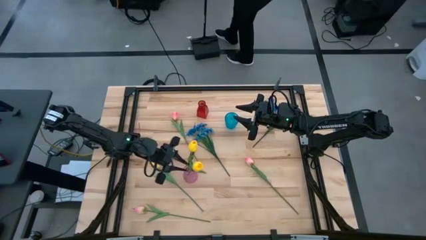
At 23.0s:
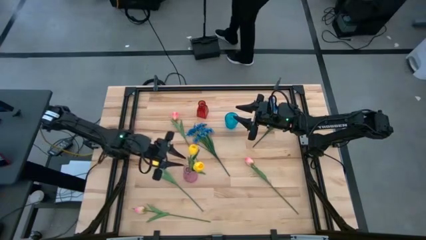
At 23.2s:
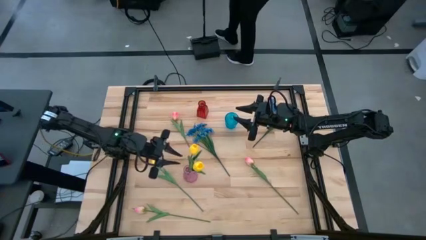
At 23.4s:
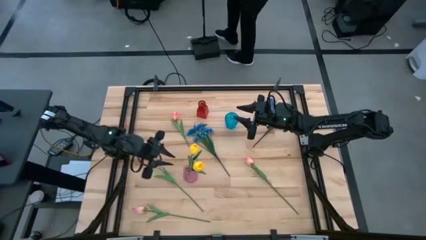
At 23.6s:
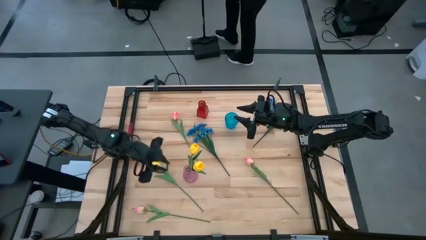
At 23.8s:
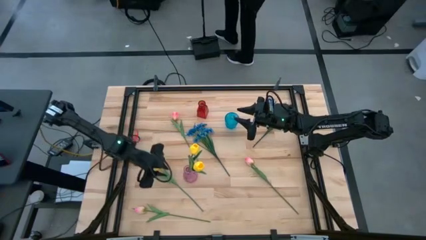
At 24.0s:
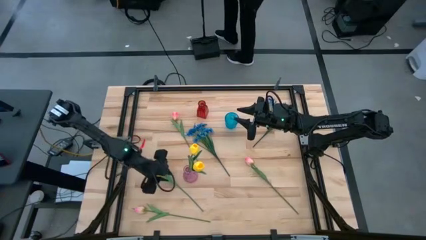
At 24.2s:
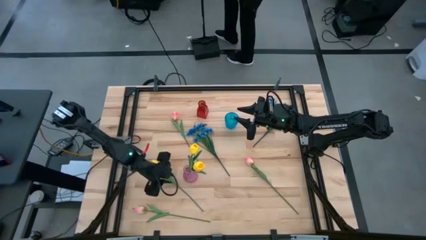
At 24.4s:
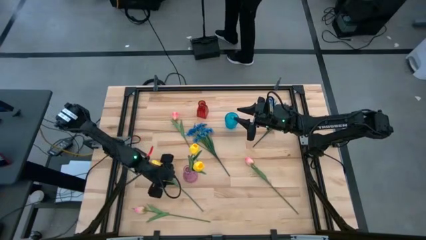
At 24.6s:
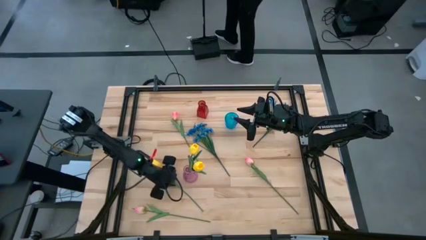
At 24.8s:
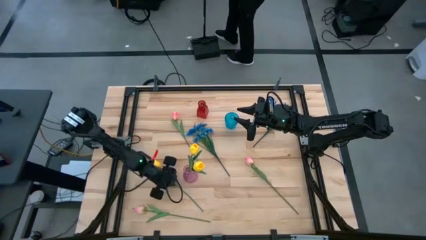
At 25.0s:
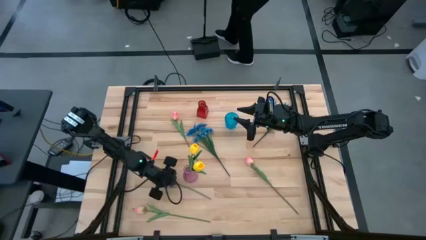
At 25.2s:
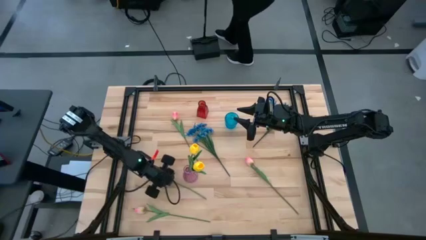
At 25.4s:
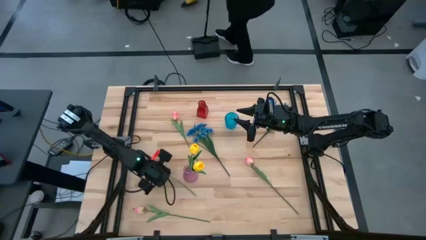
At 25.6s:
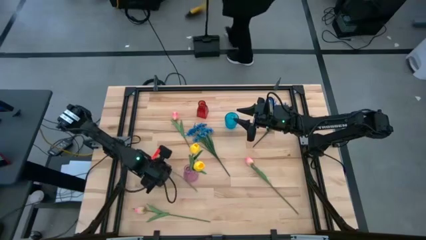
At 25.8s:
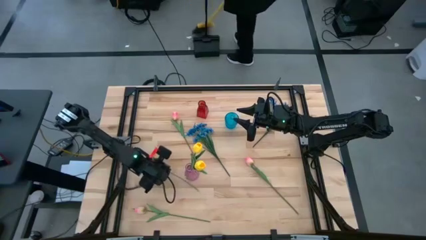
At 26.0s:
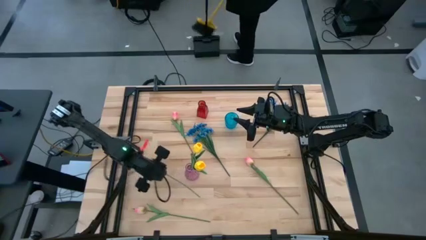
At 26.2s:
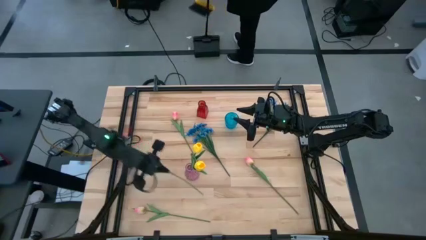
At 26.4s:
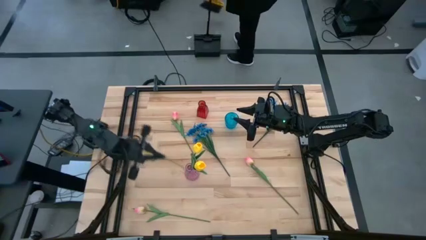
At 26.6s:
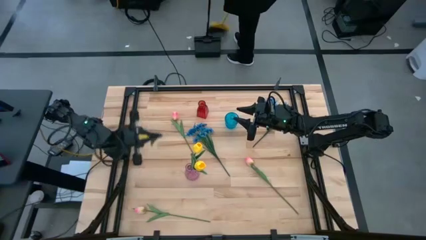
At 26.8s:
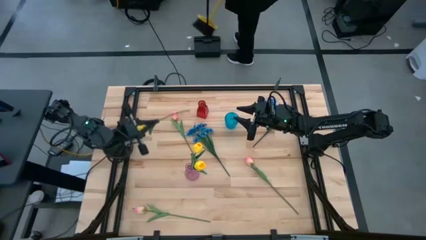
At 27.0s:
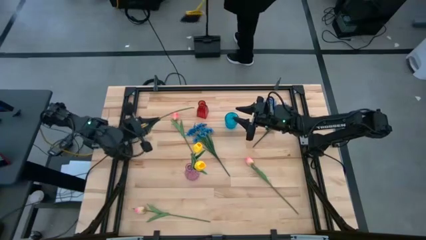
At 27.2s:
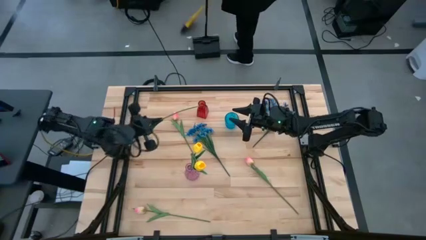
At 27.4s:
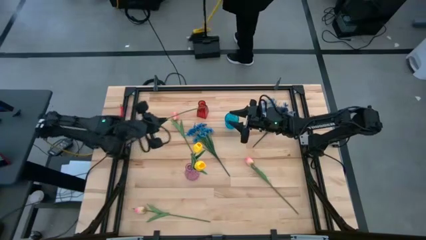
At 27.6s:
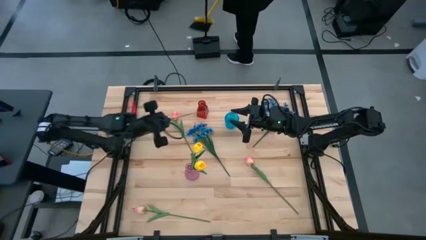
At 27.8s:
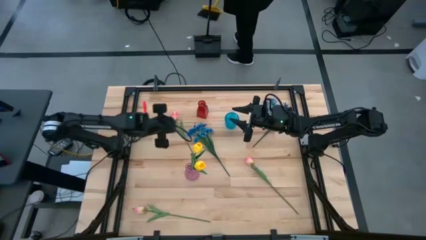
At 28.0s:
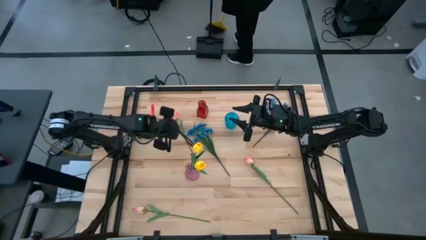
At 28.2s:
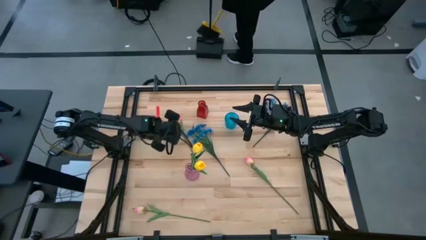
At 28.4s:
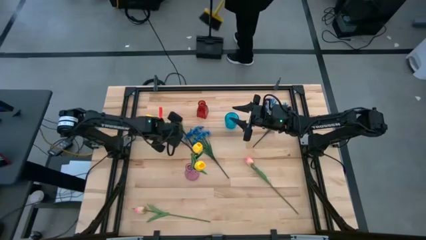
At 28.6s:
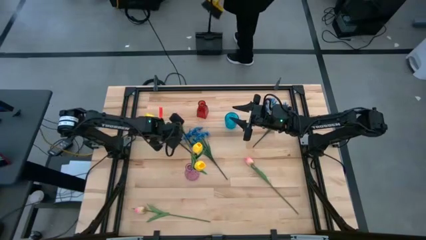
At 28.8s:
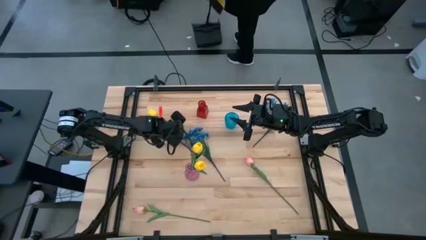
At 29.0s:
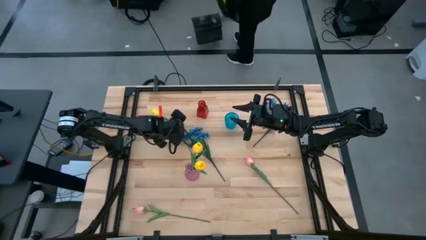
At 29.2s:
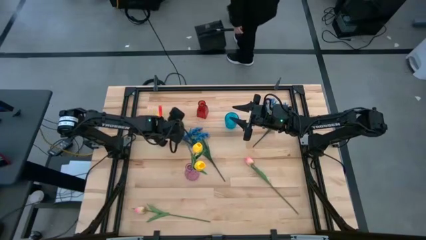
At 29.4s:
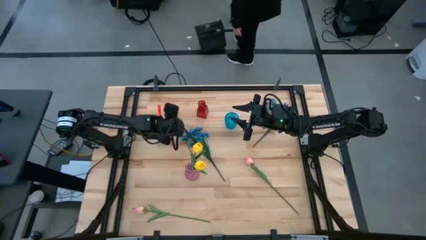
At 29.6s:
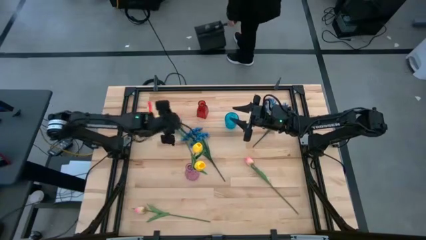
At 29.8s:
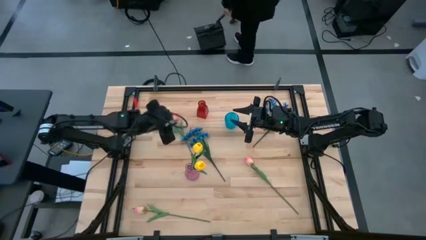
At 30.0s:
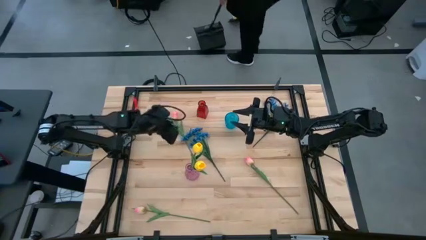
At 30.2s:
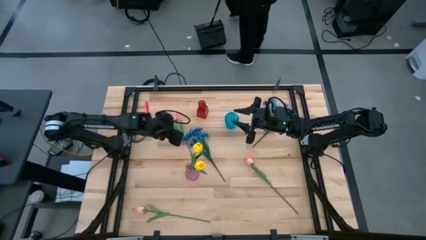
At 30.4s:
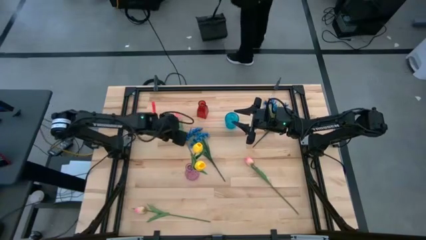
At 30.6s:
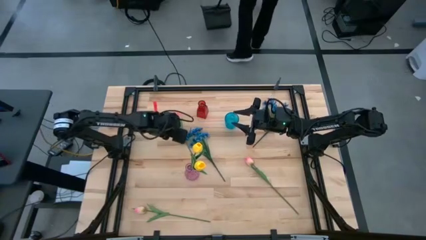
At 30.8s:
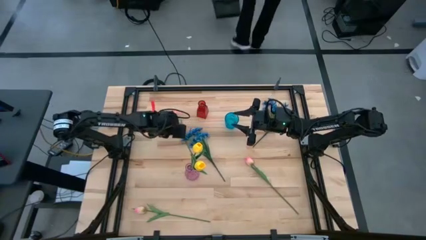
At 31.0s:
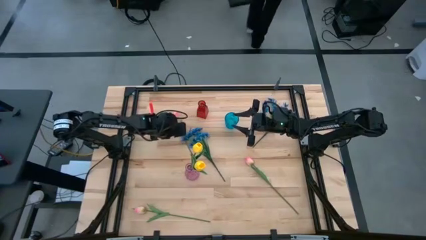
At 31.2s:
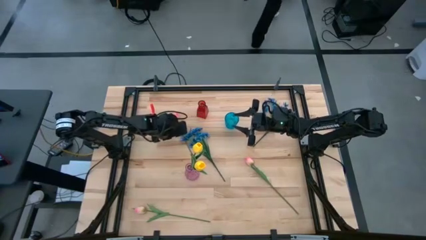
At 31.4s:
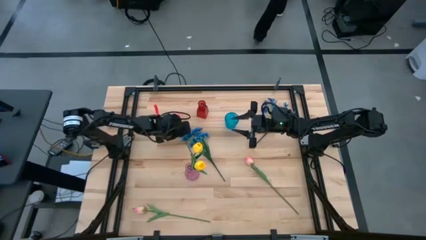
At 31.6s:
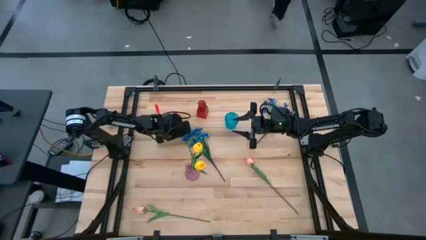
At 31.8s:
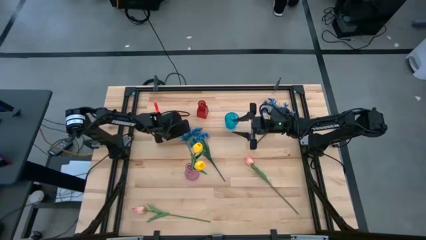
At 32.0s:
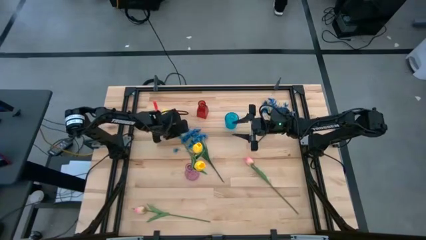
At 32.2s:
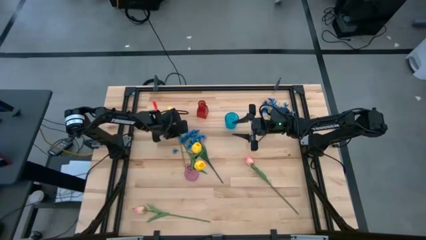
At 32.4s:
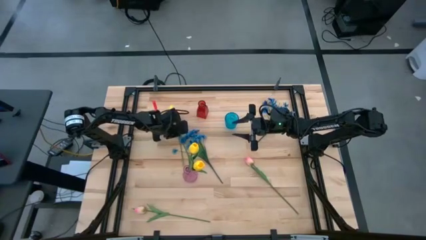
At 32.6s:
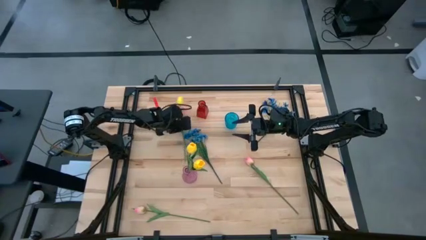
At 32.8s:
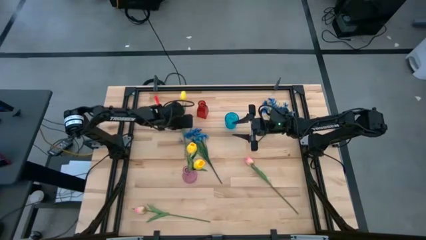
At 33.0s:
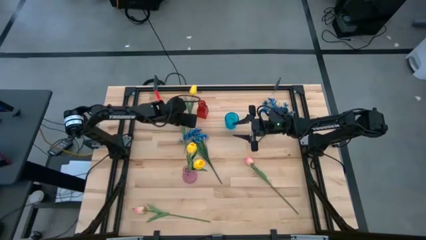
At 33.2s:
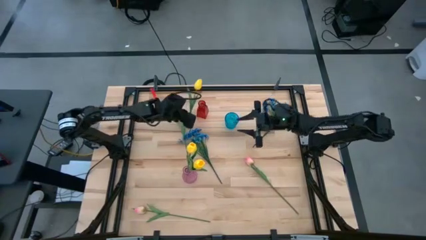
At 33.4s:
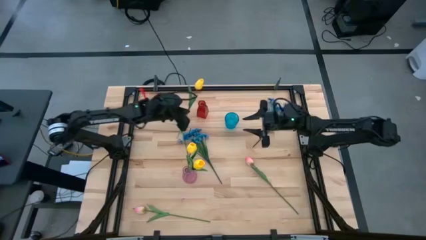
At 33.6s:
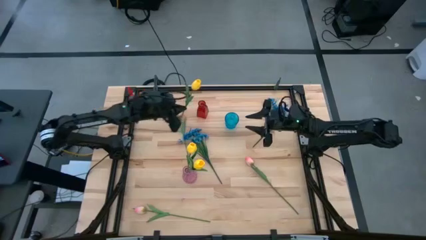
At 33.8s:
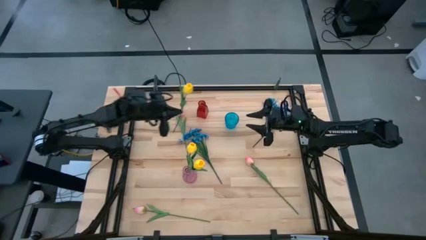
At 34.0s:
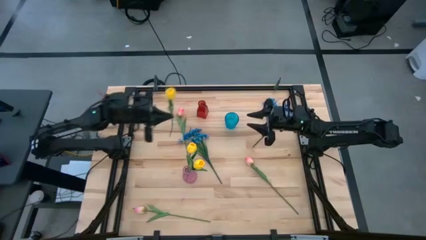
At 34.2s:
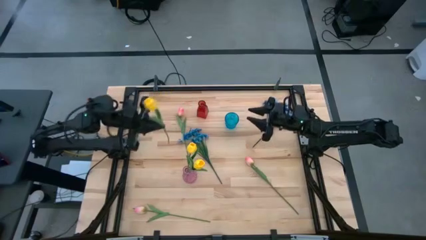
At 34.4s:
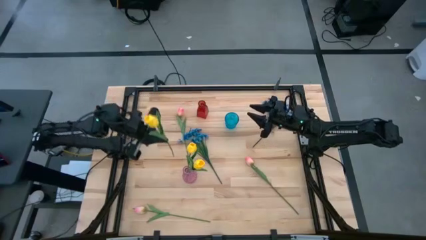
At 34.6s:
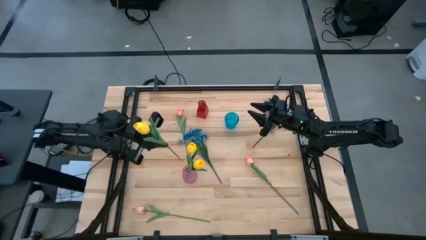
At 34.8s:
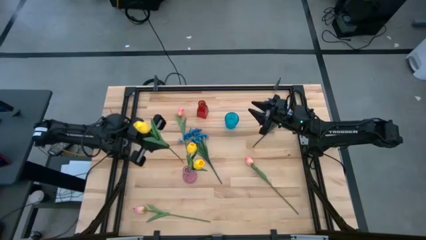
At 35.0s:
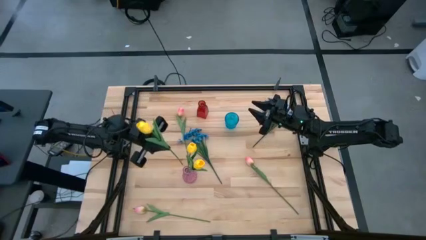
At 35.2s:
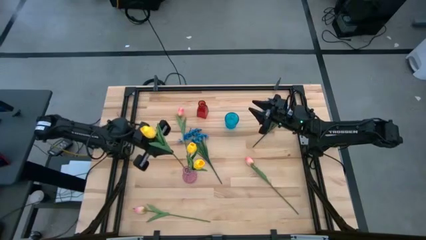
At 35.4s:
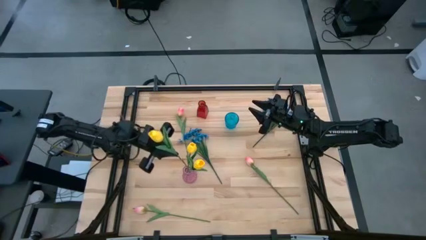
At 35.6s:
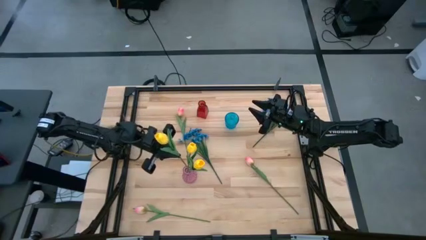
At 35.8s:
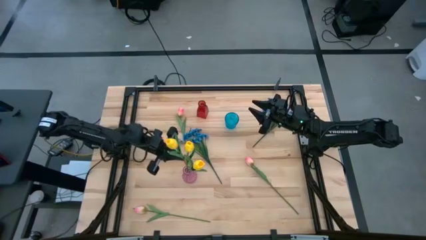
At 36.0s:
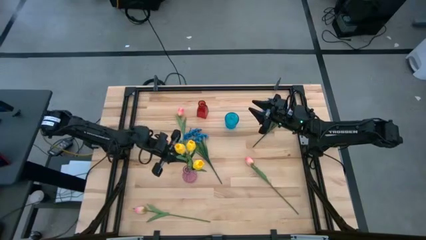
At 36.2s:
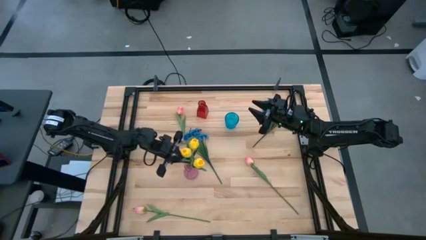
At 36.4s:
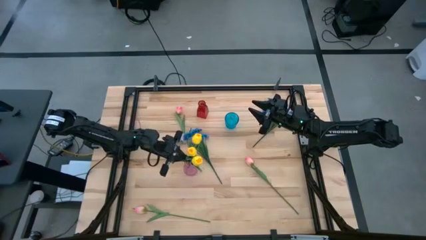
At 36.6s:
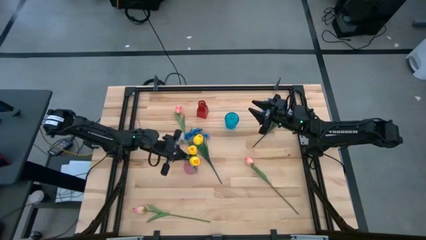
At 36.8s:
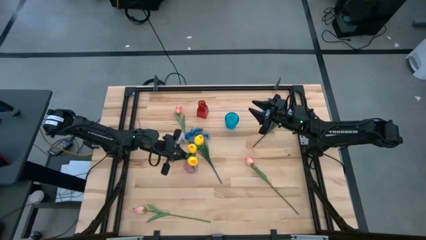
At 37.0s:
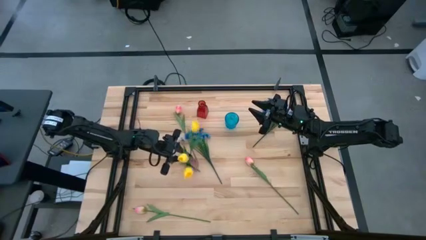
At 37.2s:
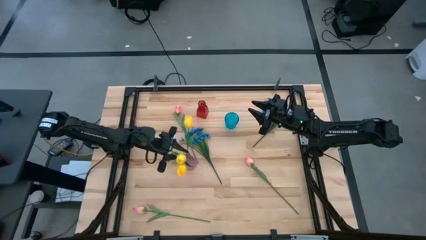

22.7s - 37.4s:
Task: Sort flowers into vase by color
Put the yellow tulip into the purple vase

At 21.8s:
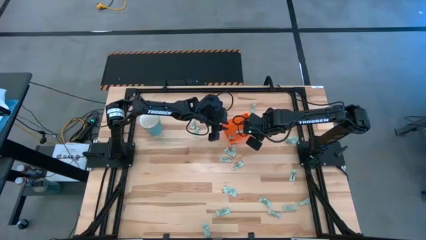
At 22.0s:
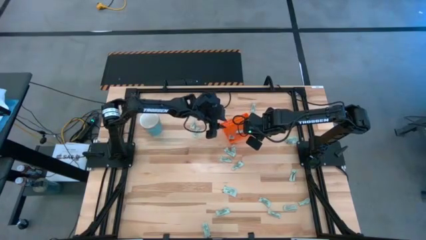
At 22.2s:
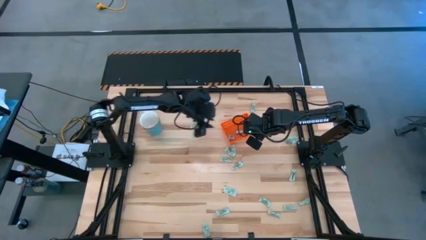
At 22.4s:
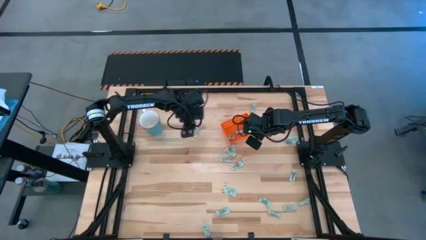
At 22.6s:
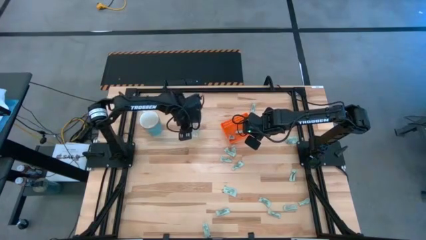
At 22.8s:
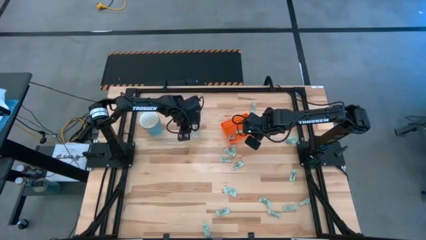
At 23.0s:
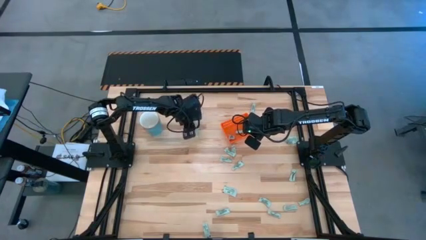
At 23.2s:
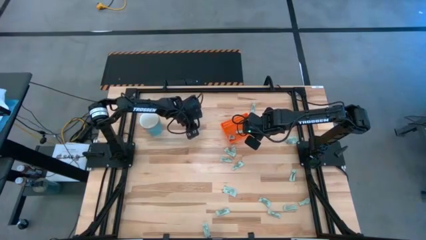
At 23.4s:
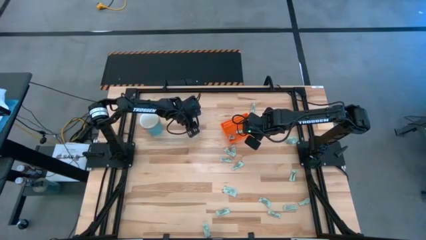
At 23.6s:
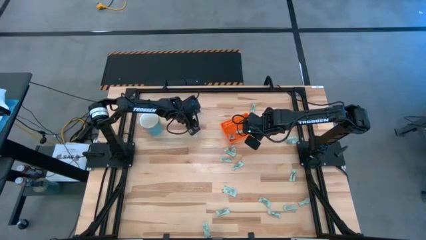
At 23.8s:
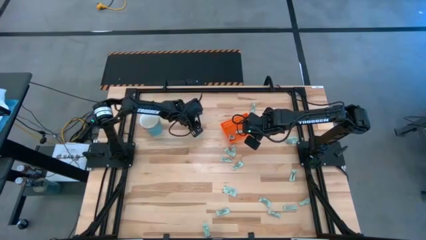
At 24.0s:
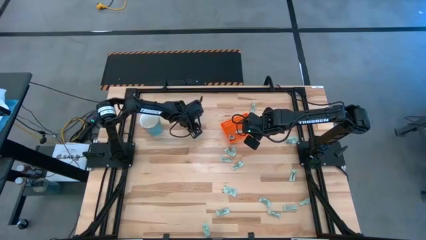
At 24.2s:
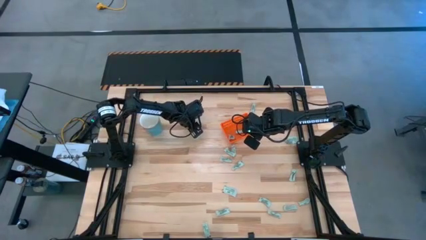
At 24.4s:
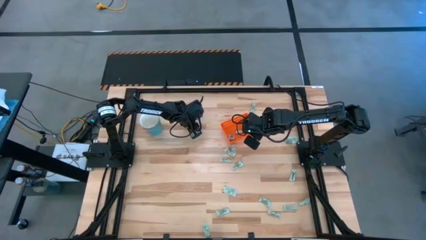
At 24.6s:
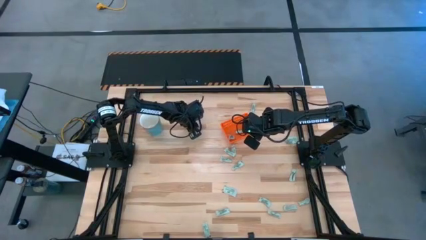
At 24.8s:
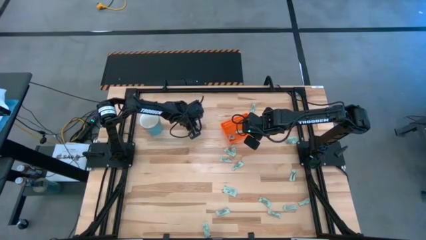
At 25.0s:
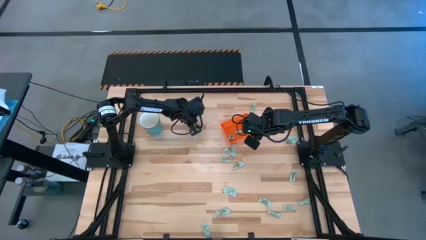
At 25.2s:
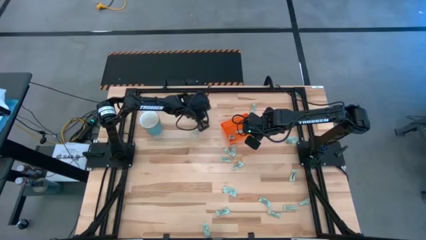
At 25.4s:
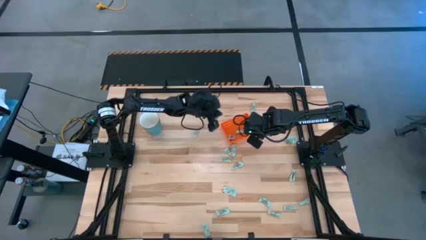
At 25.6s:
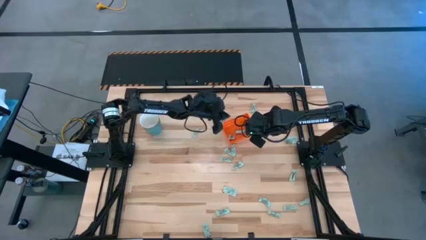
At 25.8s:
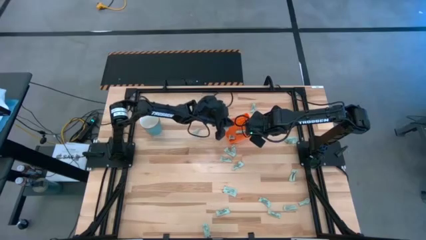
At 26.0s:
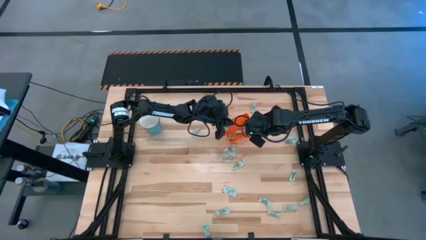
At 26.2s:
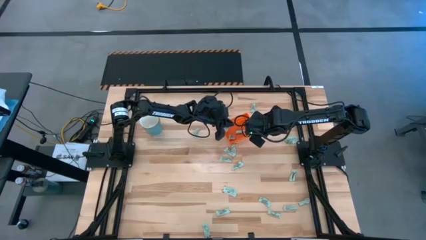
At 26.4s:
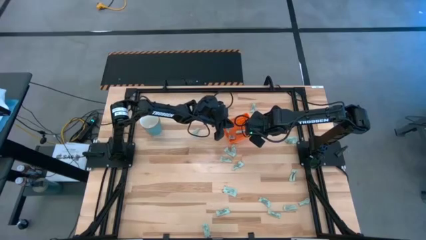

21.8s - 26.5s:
Task: Pick and place Stevia / Truvia into bins
Put the stevia packet into the bin
